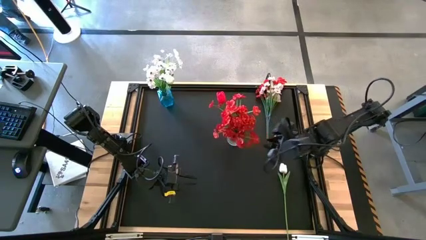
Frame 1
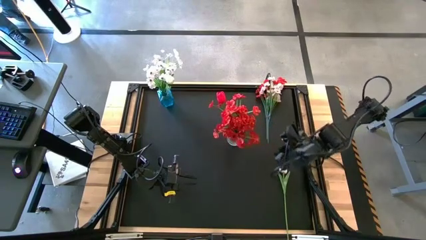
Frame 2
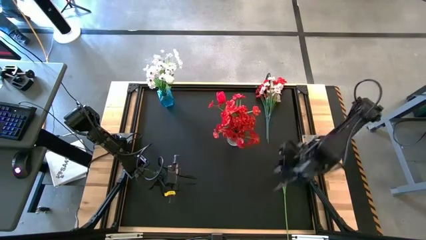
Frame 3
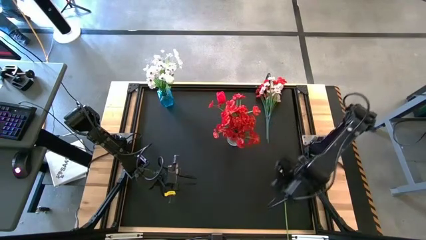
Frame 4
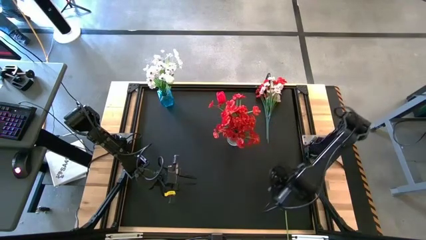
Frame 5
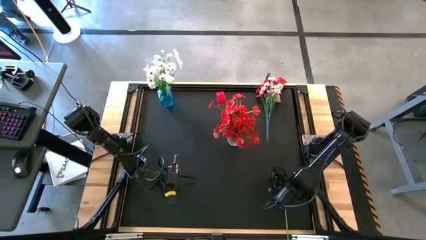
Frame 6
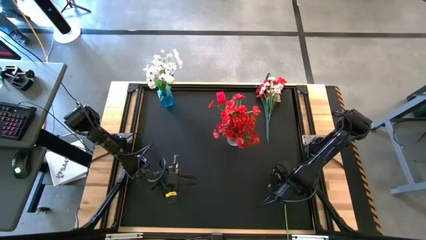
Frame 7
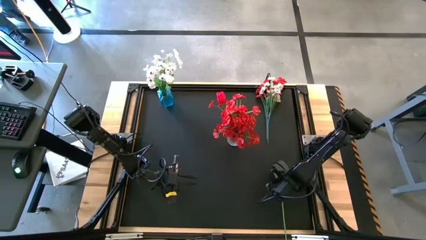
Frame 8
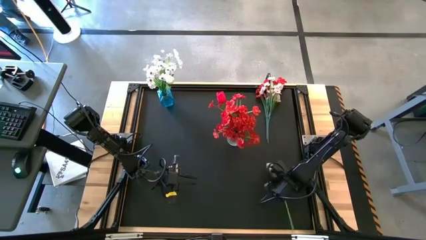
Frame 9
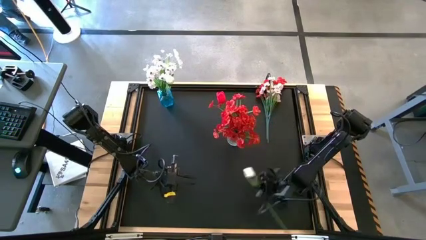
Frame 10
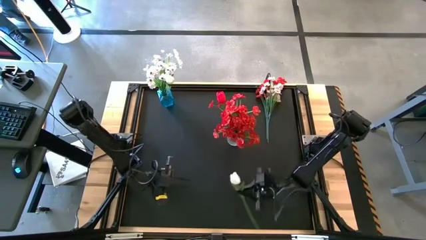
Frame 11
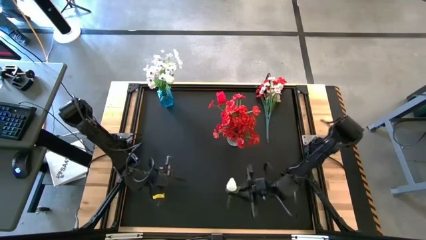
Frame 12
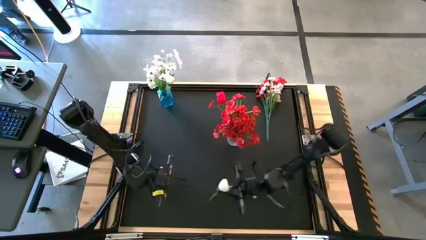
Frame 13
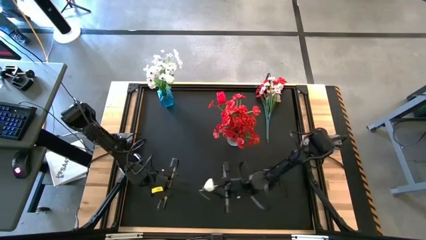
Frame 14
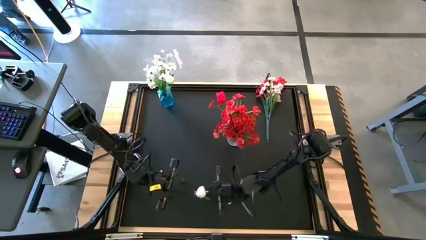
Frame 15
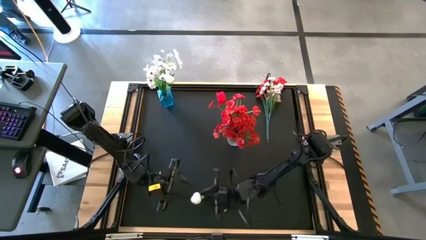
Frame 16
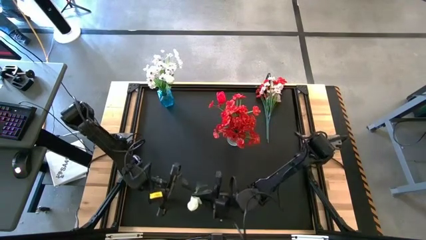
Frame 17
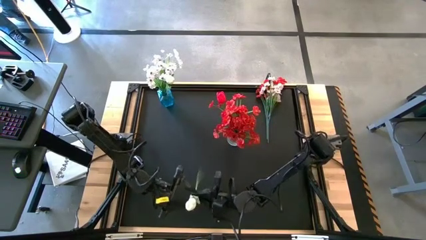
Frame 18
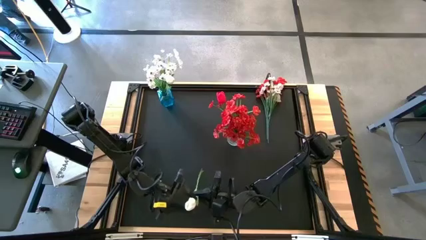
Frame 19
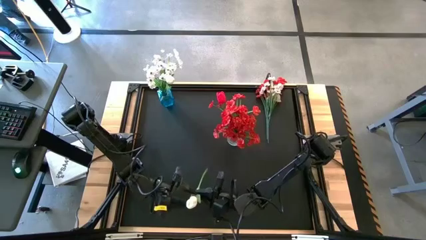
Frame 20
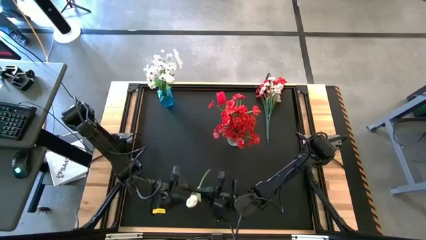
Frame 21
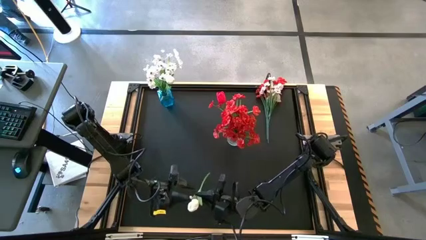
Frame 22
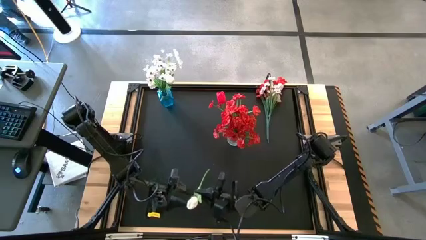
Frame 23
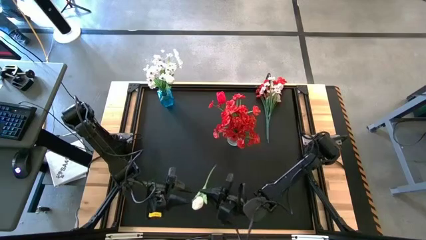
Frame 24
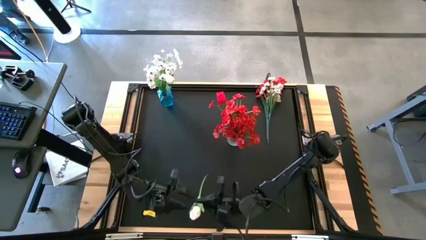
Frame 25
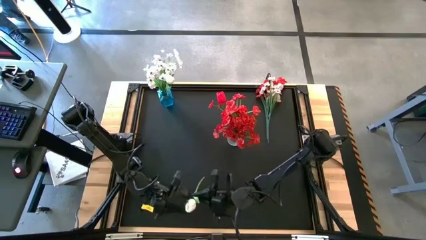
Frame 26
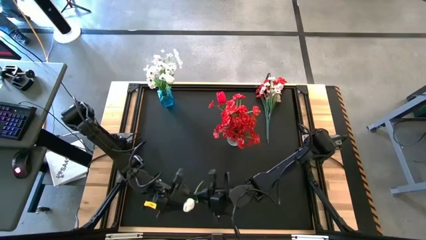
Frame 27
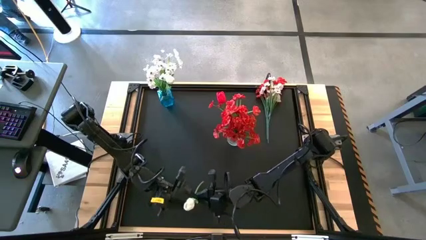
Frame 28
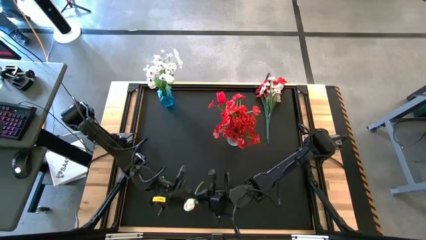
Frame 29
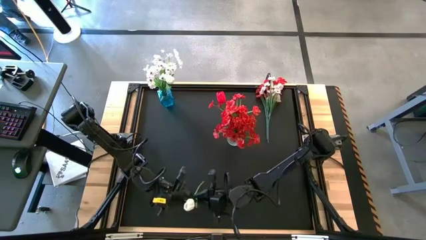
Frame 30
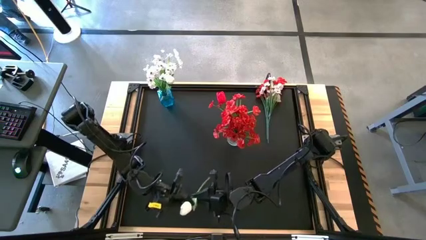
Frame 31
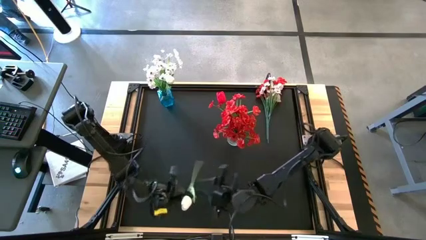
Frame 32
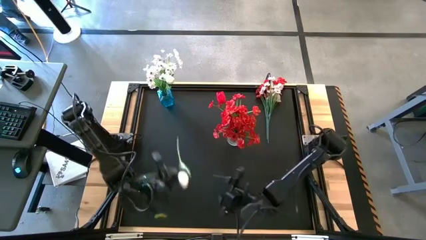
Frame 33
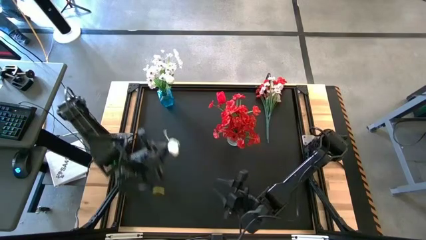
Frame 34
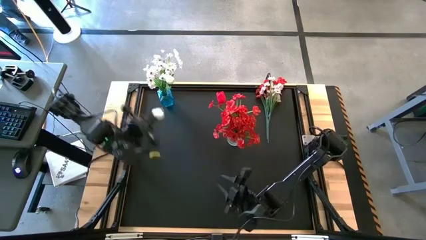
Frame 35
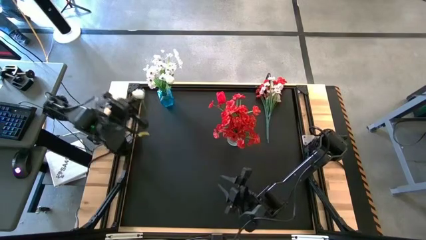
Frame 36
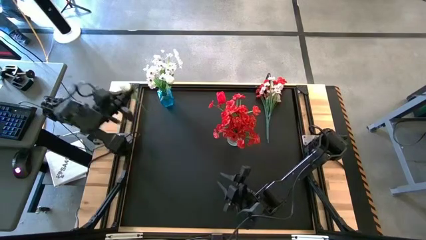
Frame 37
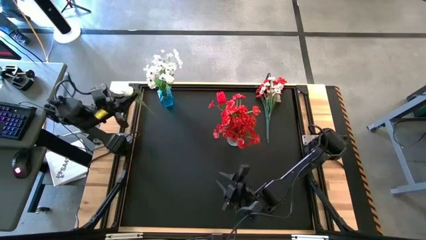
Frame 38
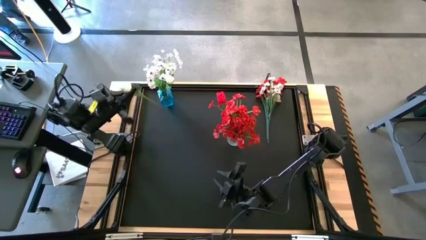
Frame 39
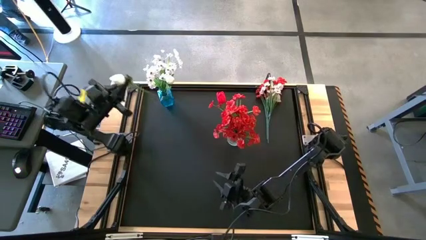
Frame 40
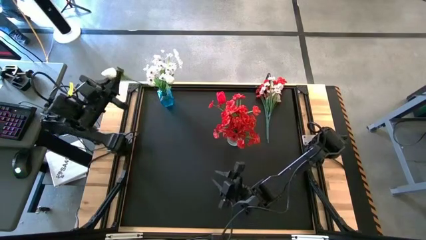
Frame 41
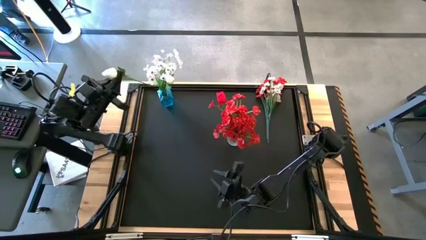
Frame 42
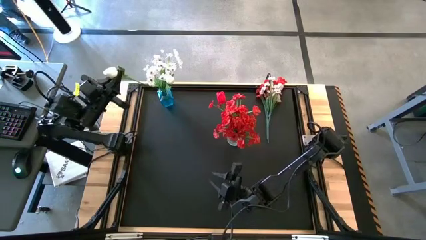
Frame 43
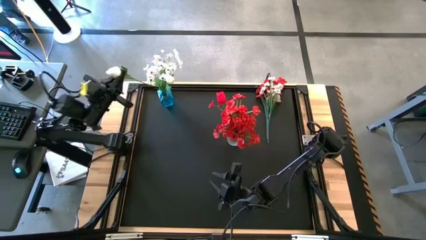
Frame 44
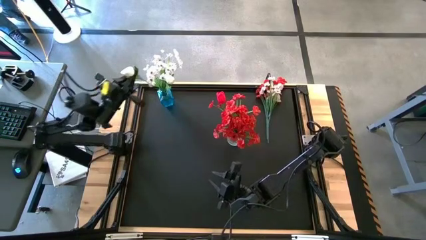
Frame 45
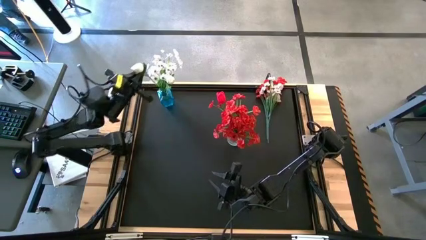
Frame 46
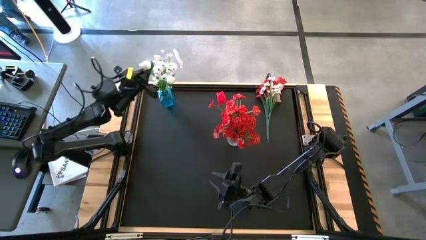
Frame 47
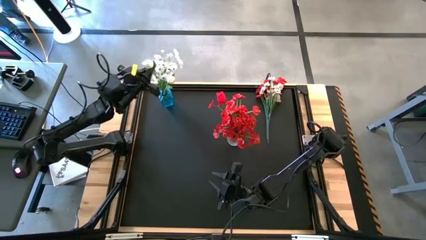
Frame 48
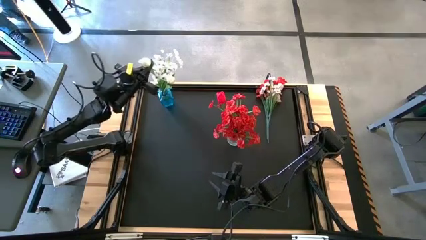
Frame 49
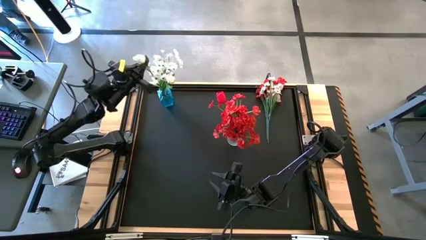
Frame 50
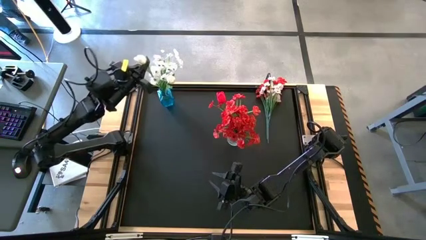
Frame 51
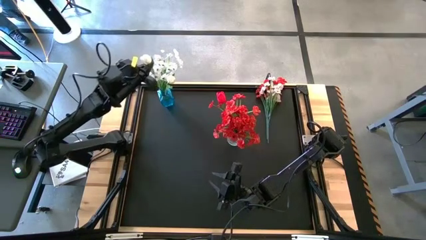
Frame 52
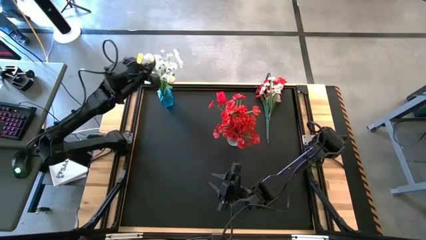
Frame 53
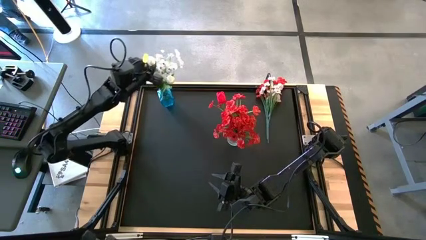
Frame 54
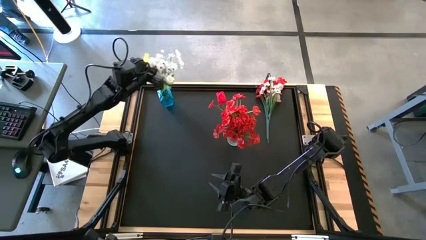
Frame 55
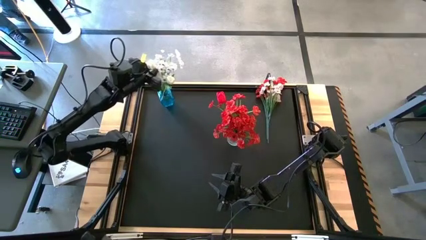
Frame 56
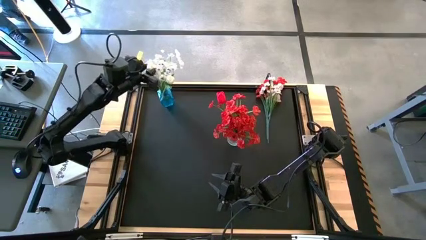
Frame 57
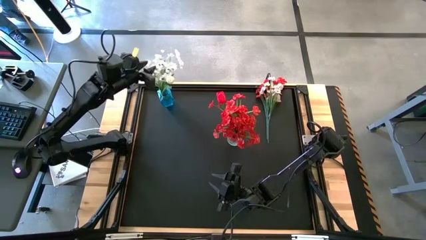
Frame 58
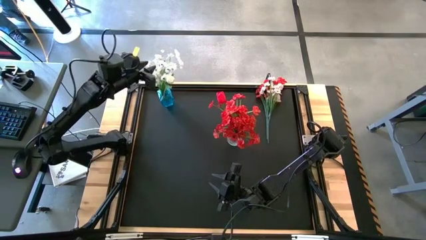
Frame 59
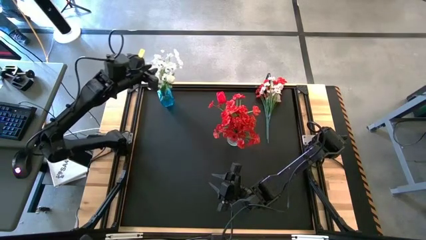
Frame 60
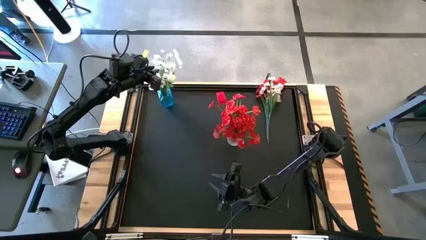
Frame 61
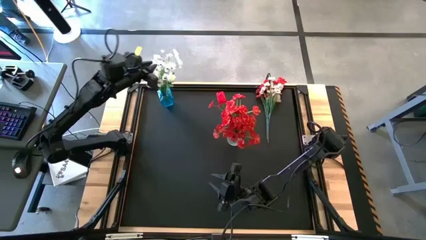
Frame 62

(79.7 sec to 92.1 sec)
Task: Sort flowers into vase by color
Put the white flower into the blue vase

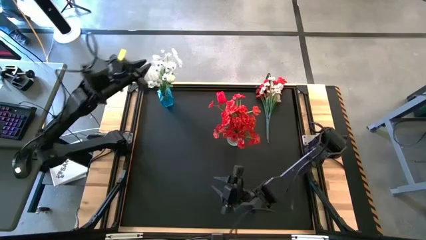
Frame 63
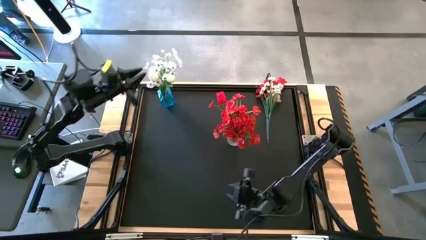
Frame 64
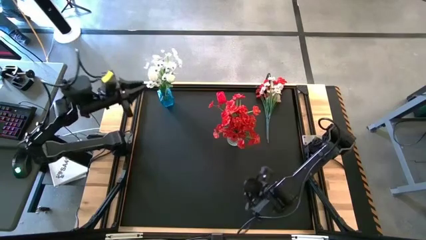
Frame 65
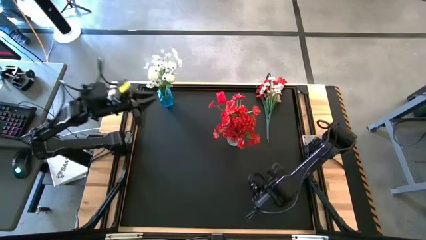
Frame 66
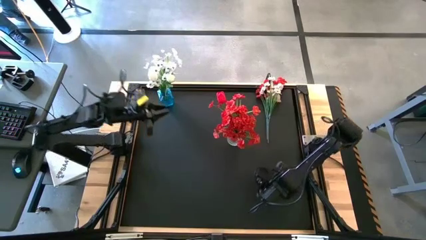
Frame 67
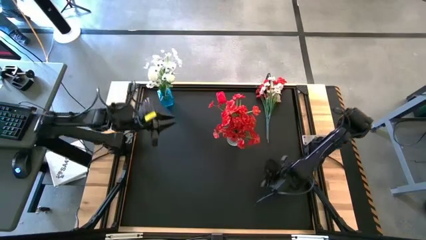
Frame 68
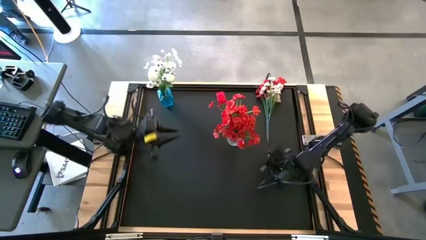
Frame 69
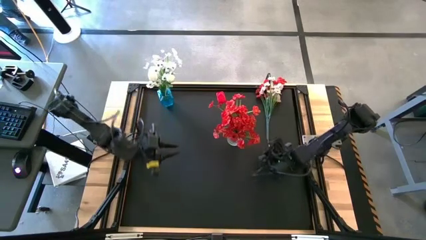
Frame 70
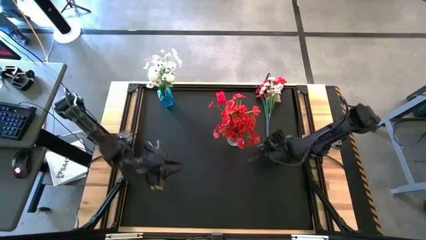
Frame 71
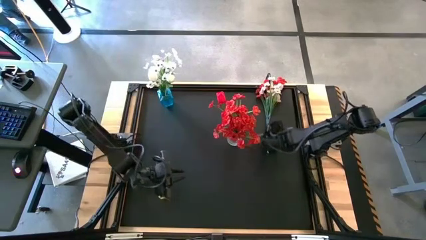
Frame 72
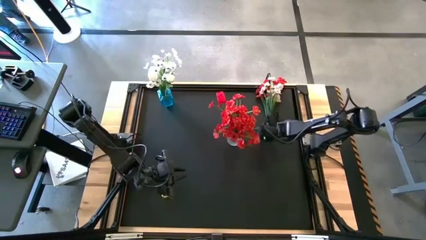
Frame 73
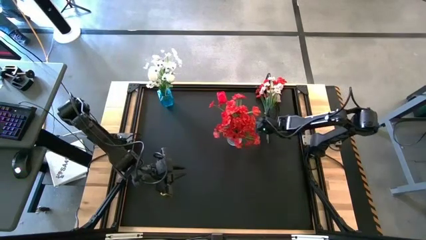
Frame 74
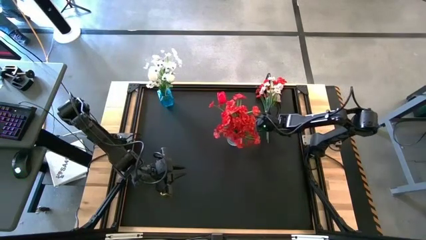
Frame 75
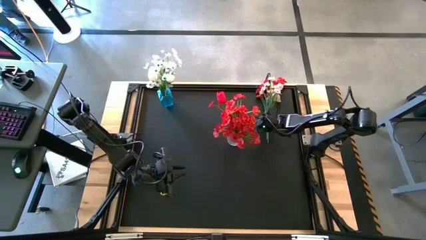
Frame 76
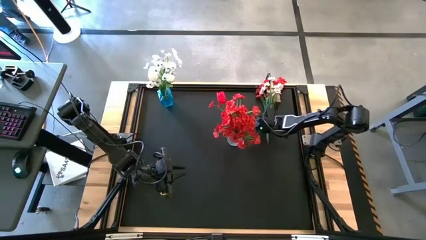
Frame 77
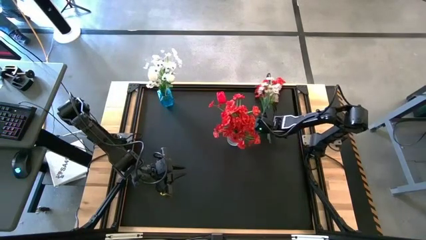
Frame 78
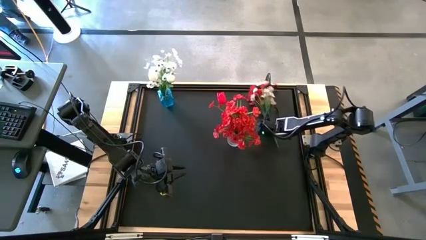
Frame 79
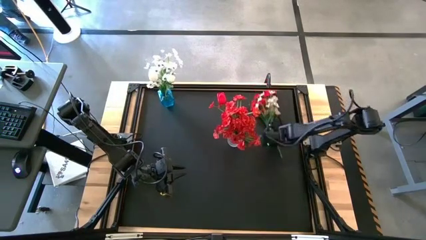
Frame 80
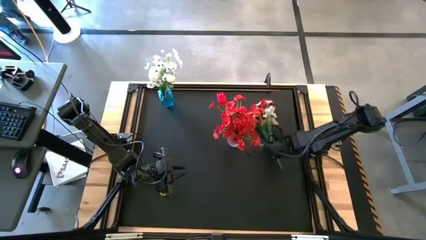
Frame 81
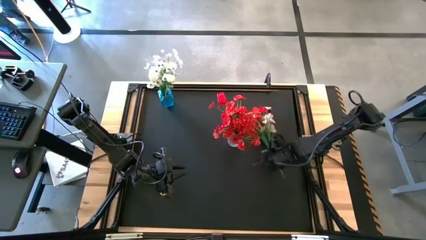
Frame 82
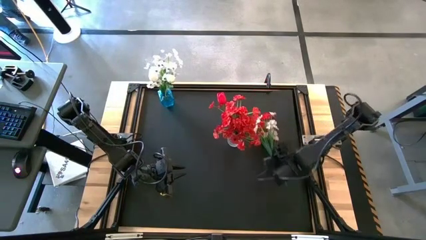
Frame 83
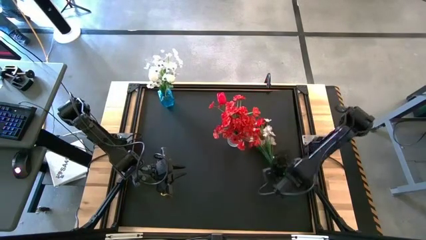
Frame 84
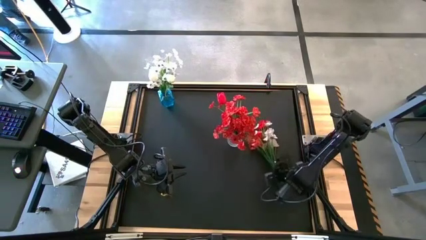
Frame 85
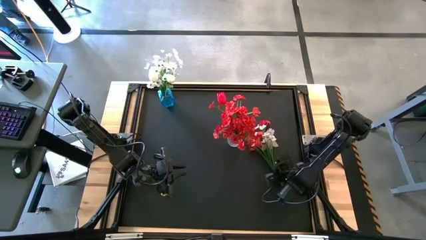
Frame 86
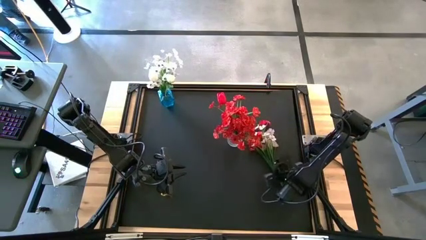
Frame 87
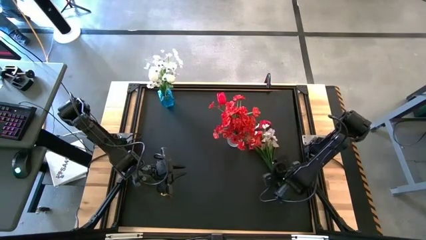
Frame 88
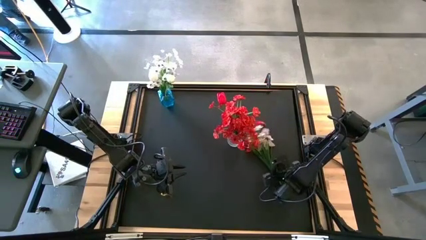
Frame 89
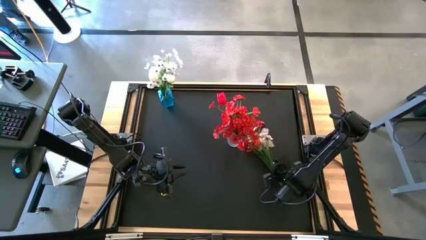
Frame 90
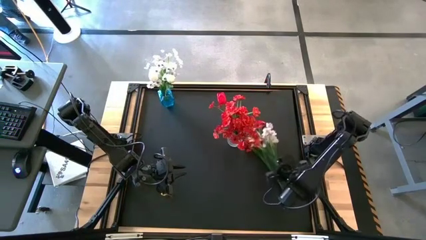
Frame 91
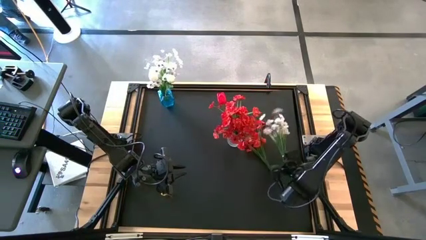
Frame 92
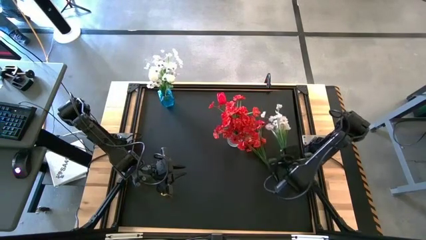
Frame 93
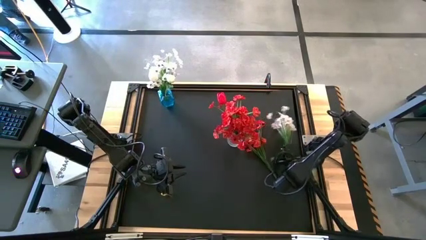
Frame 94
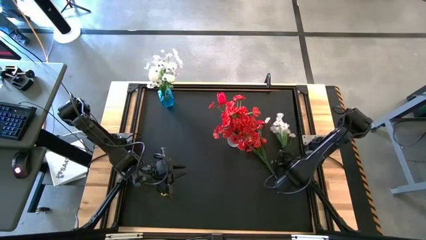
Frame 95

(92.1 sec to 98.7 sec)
Move the colored flowers to the middle right of the table
